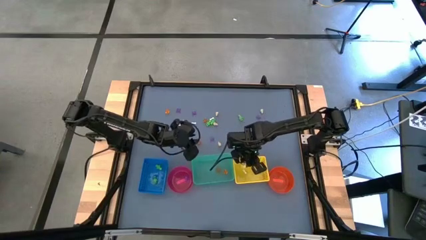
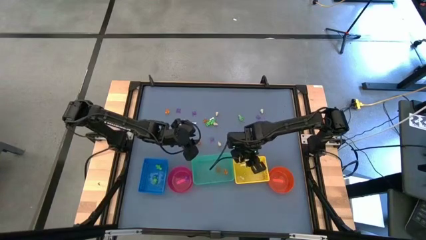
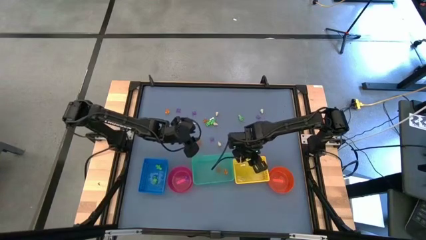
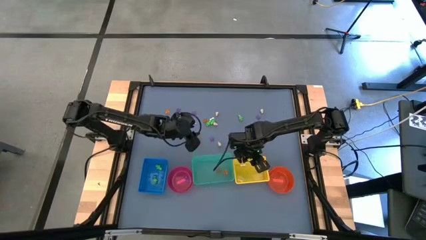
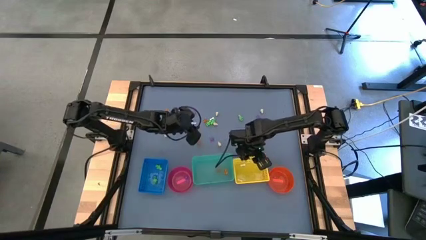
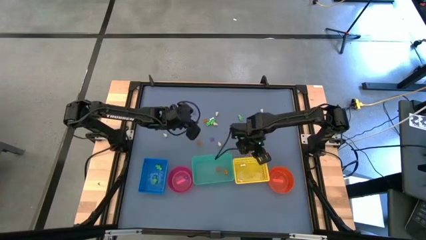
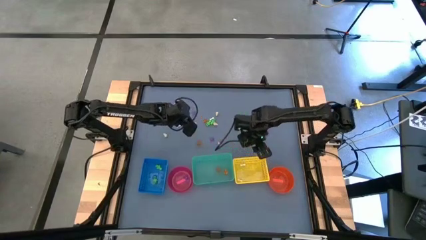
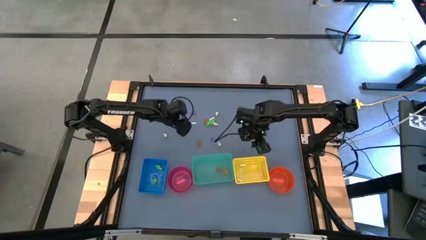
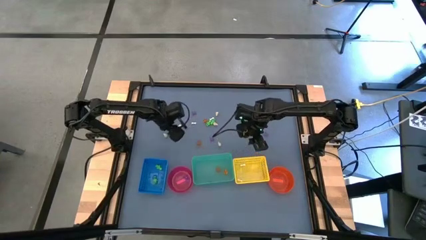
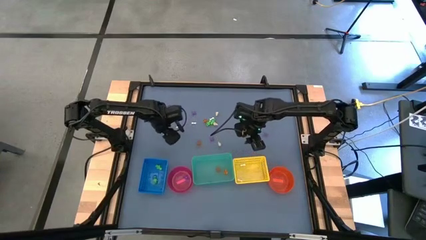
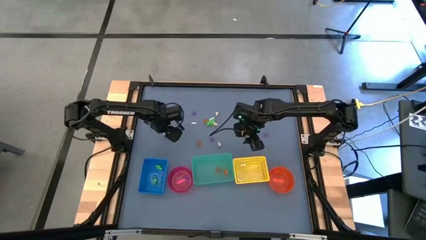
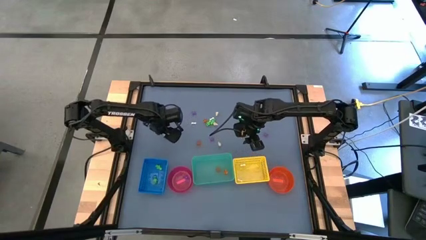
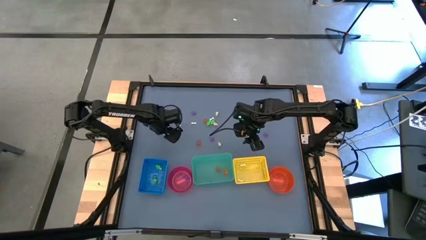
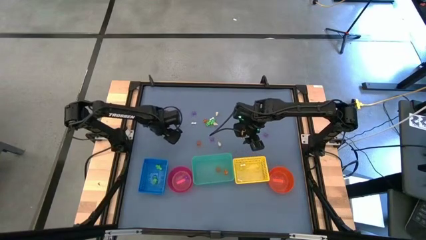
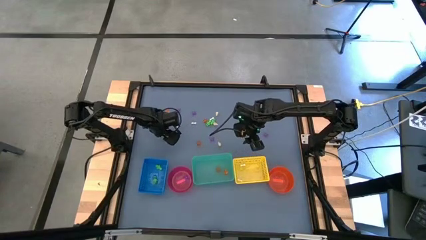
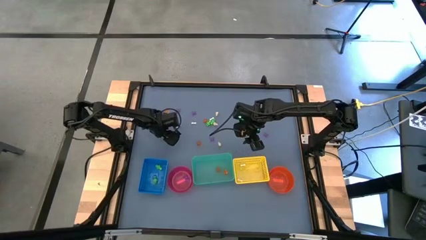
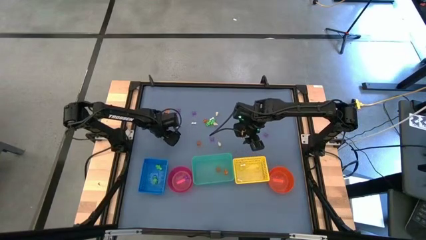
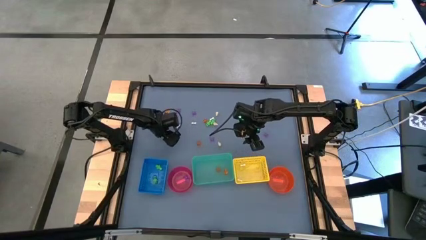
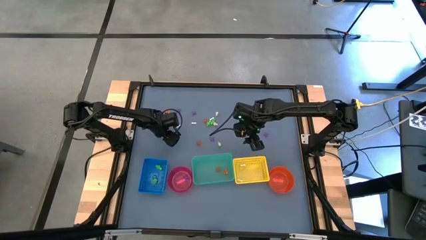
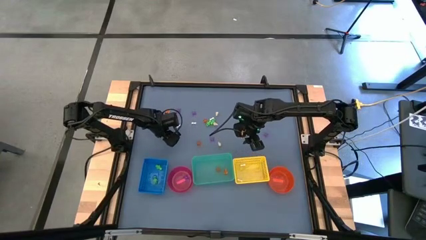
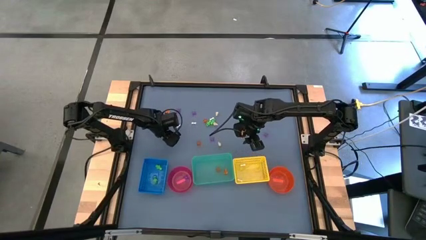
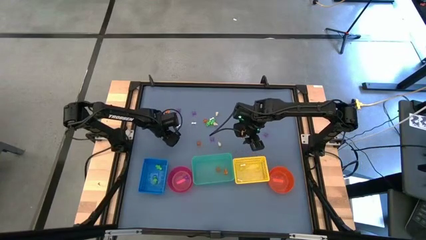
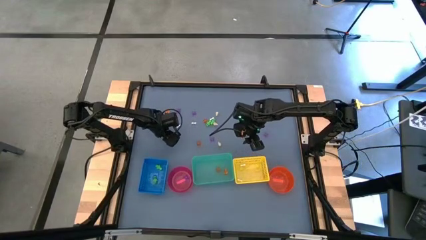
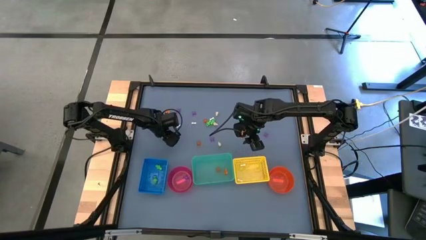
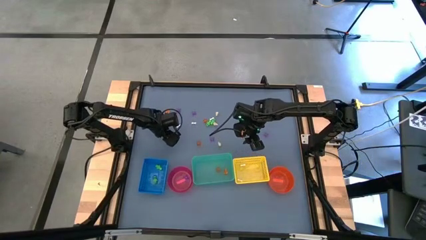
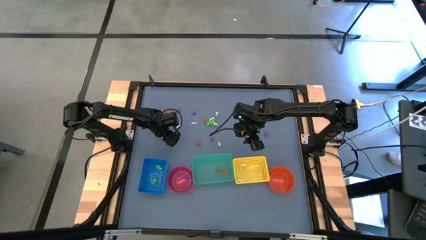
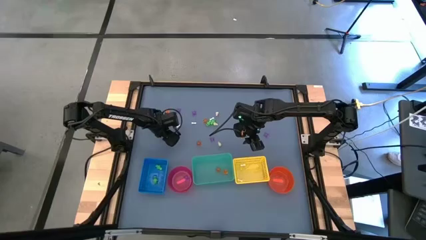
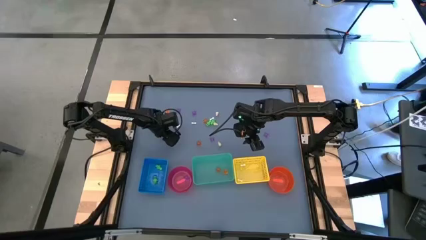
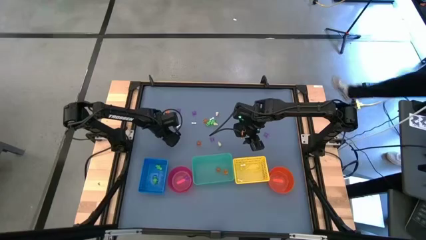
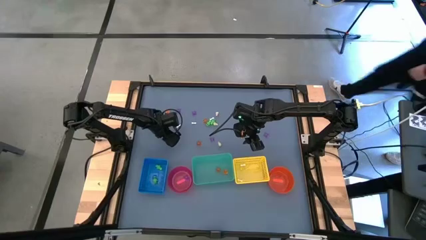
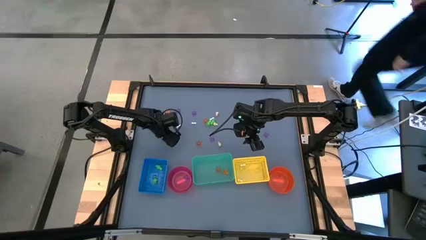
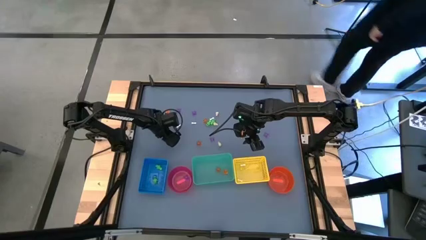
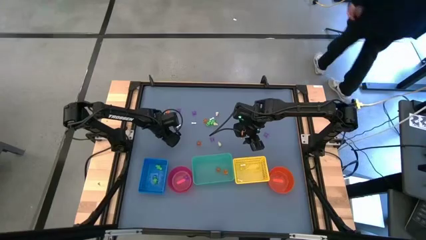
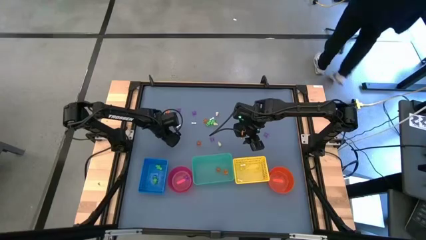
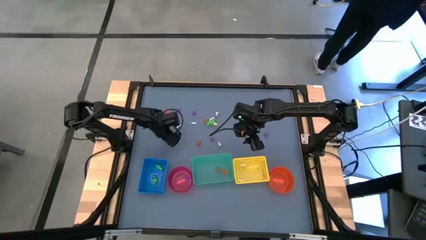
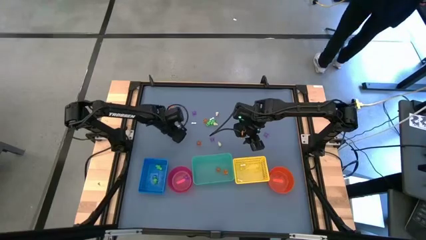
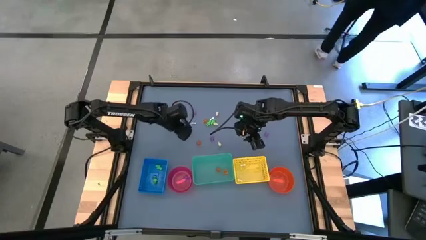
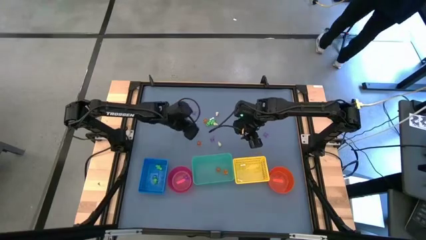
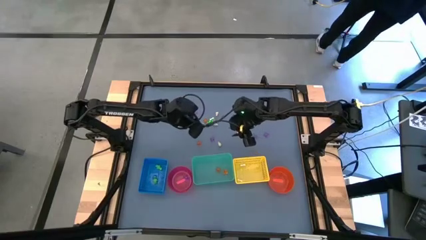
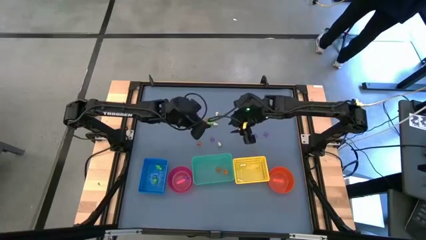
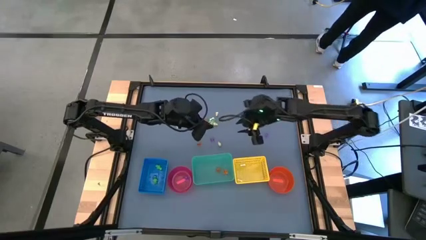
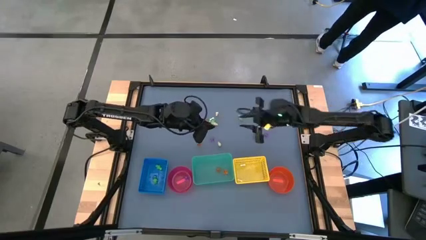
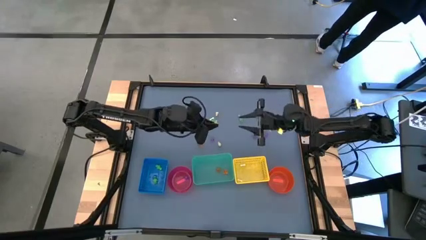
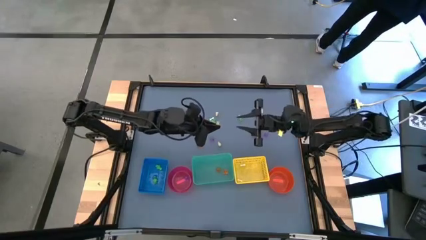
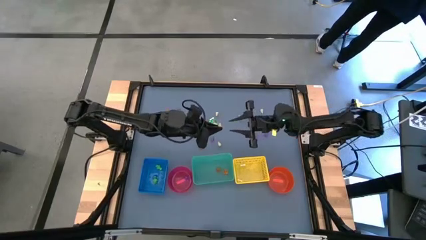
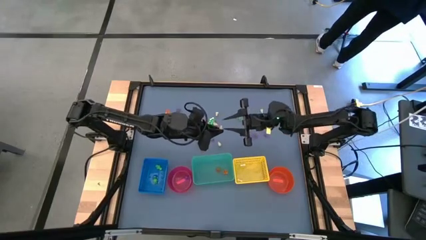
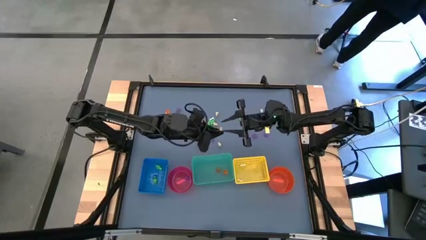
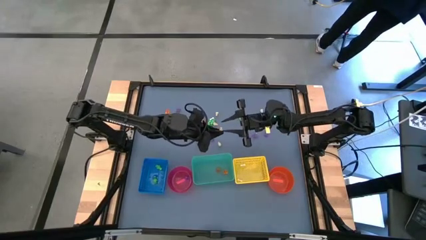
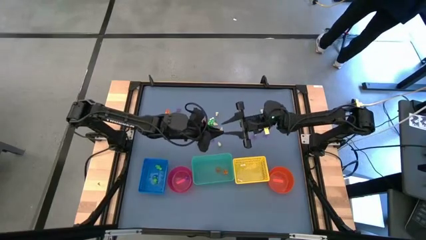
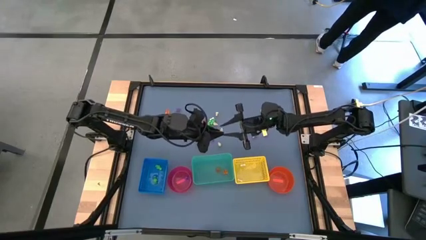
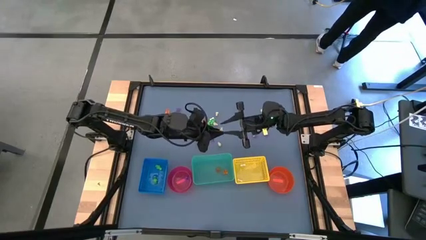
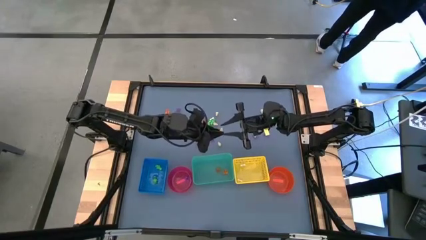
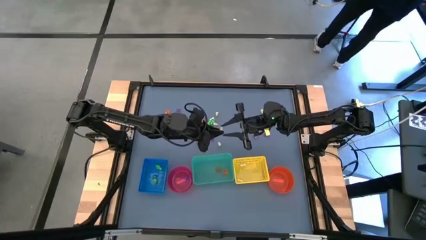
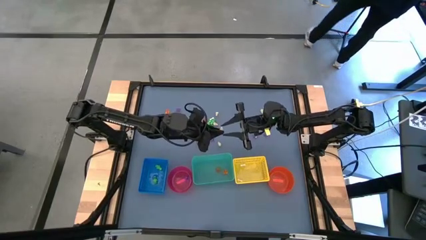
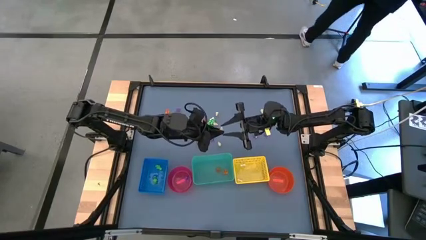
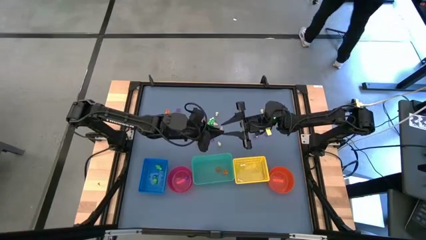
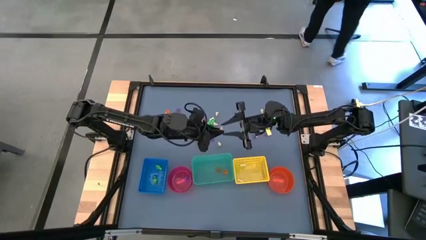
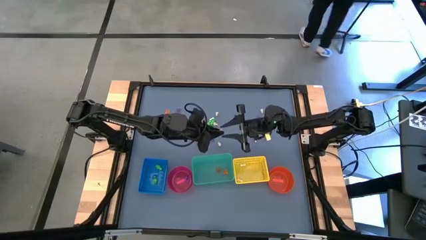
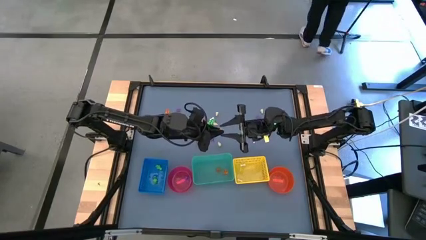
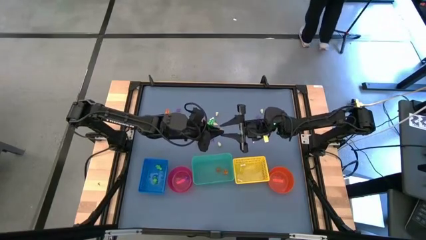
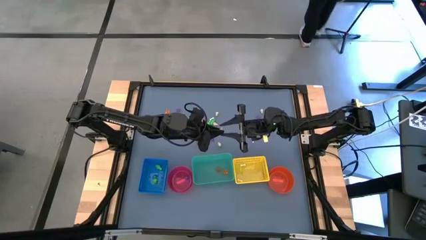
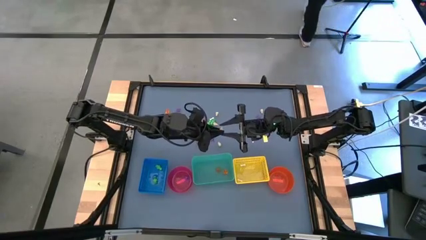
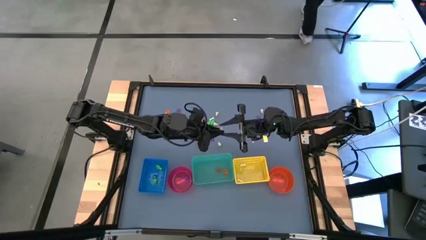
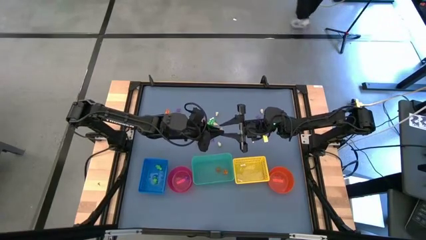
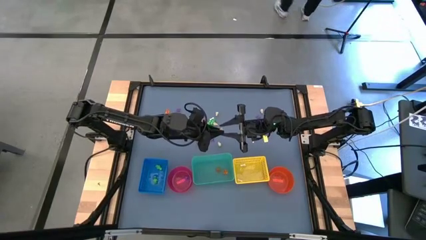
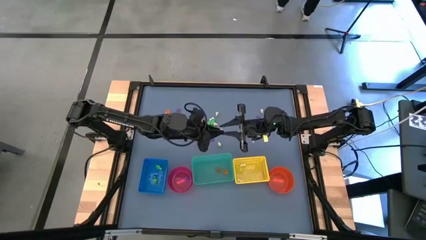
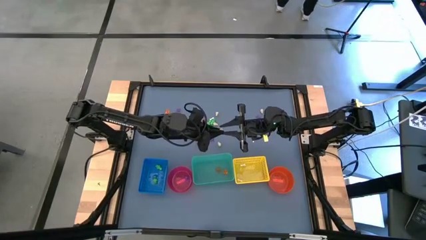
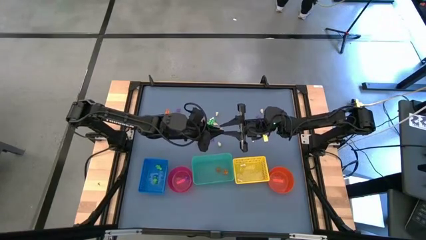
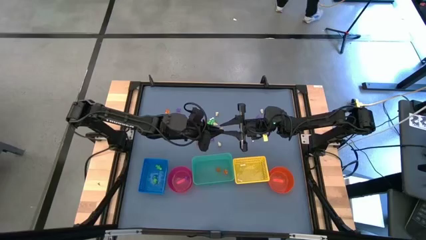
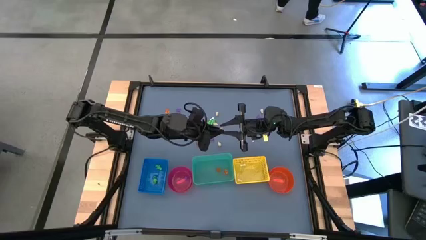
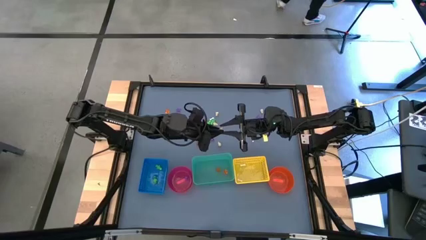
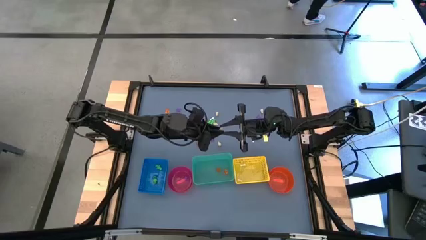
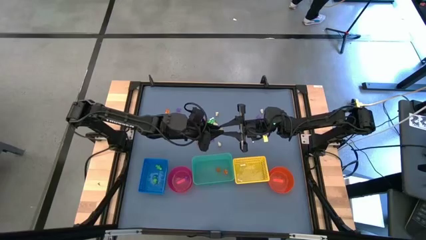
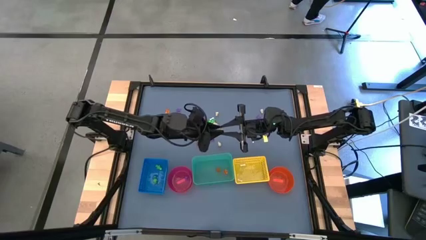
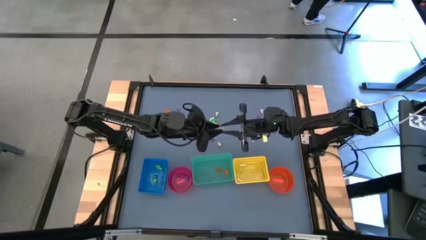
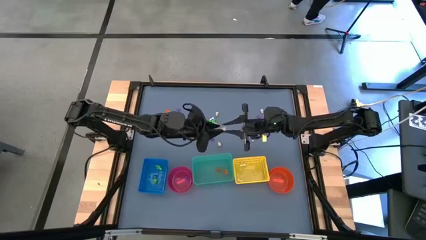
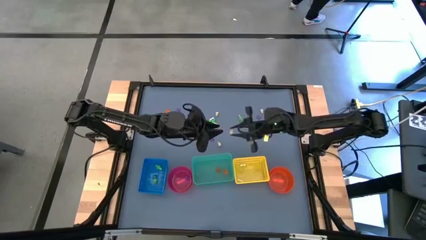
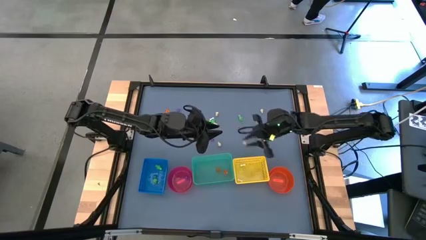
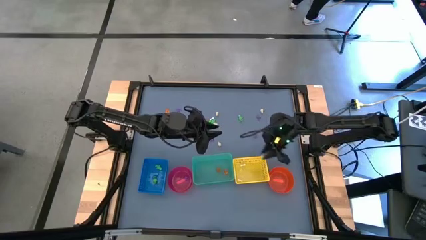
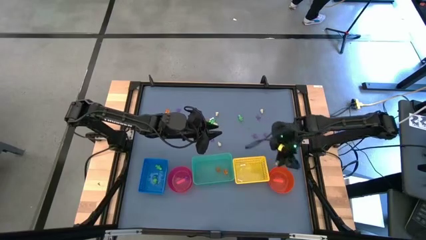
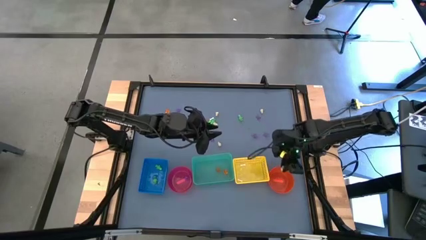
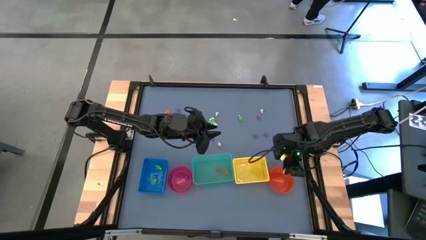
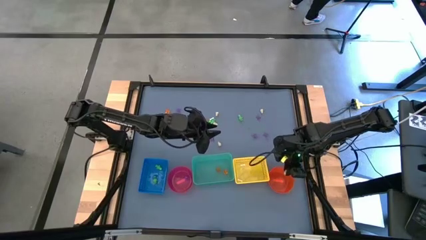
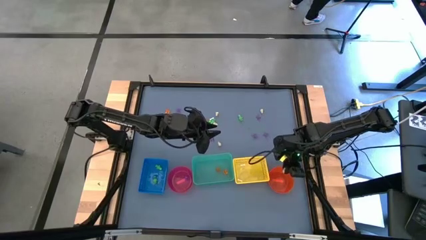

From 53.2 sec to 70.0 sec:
Task: Sort Halloween decoration
Put the white skull toy into the orange bin
